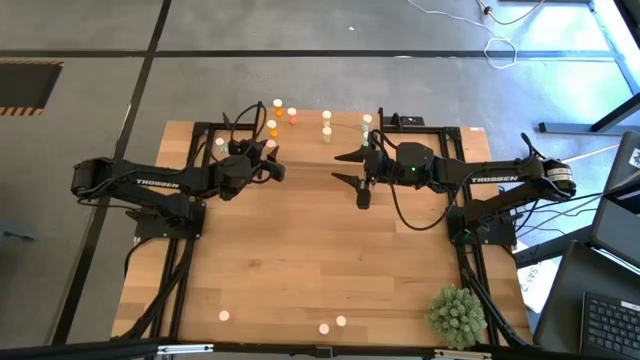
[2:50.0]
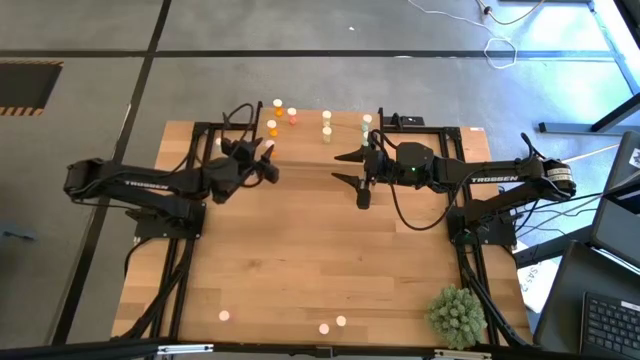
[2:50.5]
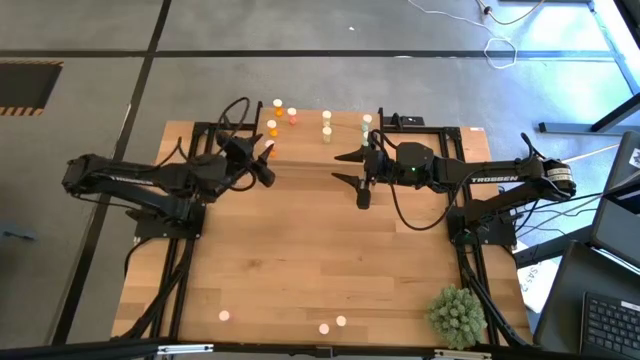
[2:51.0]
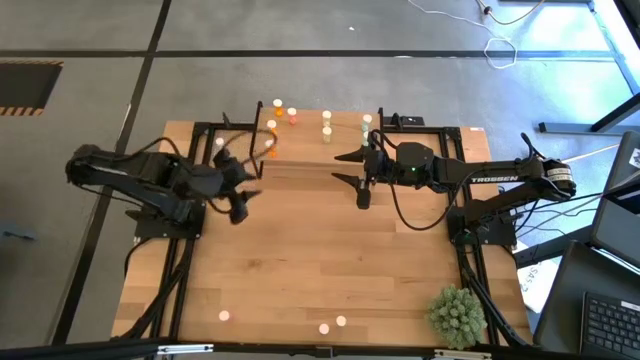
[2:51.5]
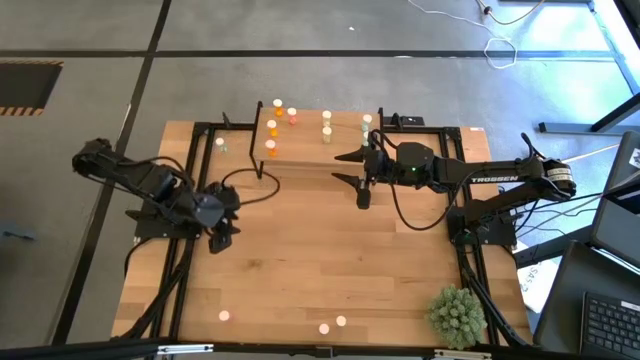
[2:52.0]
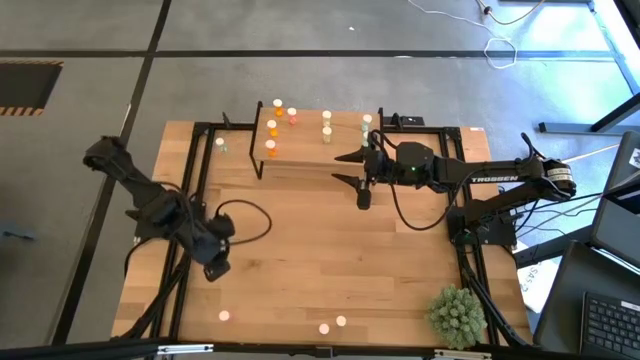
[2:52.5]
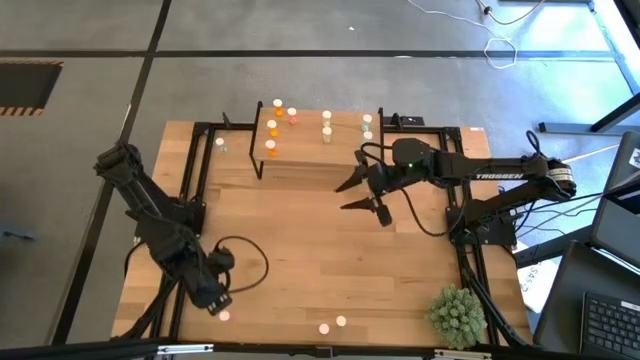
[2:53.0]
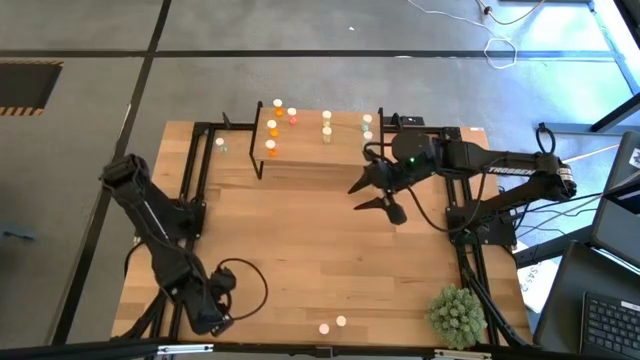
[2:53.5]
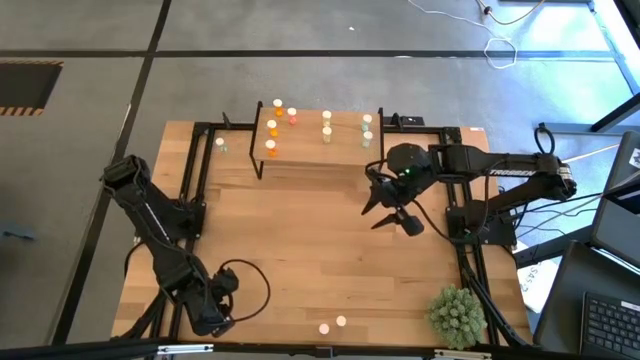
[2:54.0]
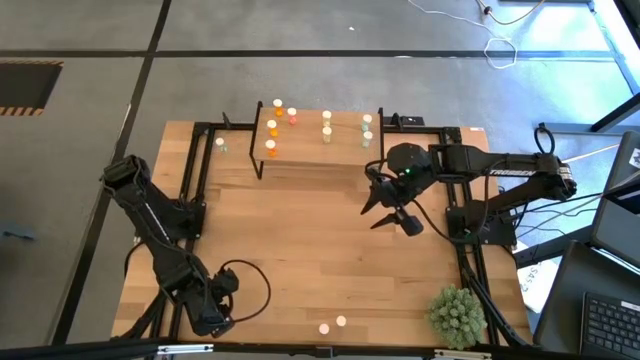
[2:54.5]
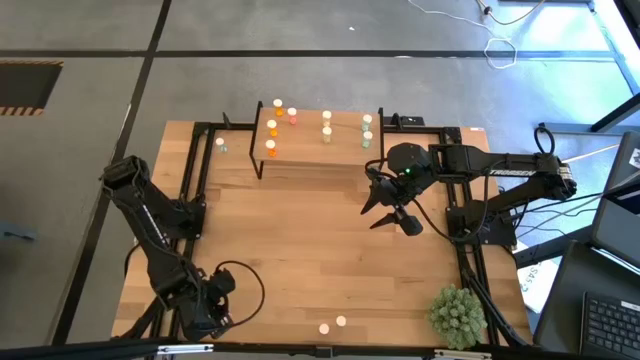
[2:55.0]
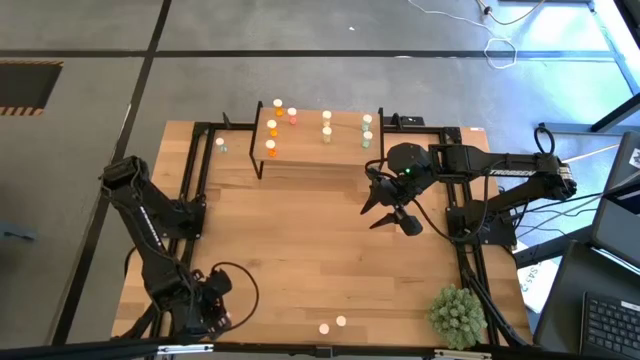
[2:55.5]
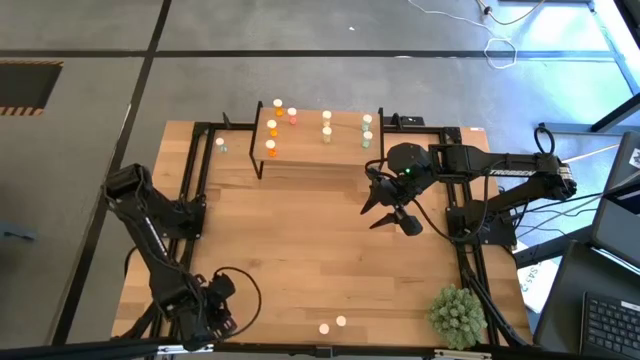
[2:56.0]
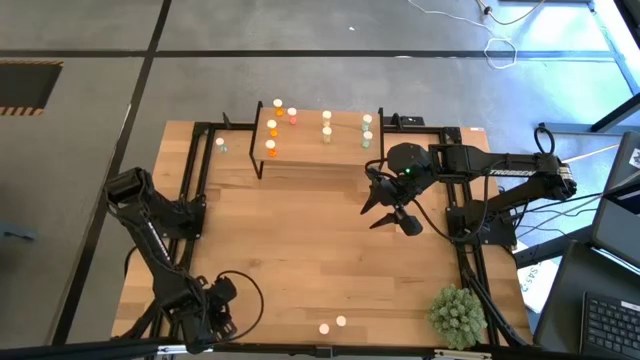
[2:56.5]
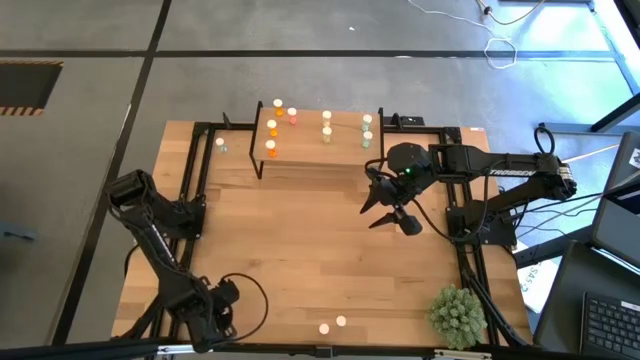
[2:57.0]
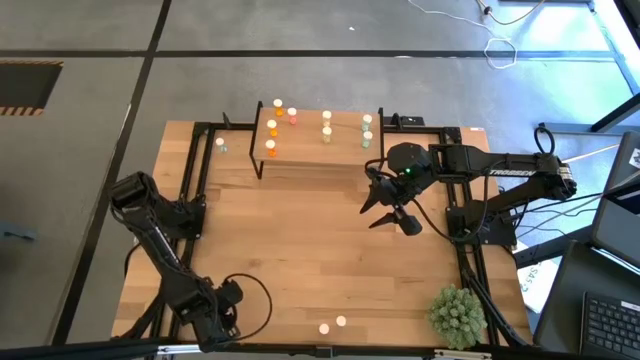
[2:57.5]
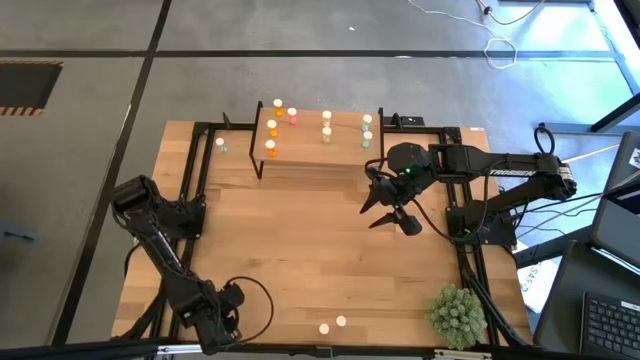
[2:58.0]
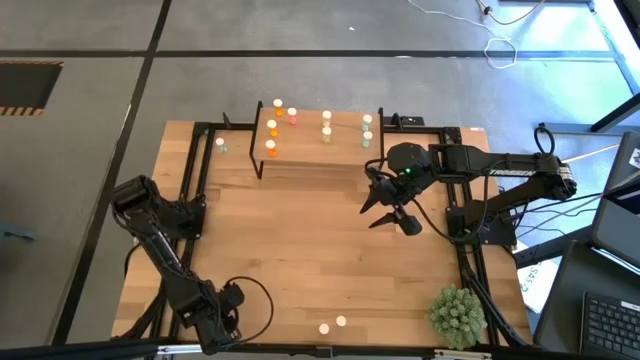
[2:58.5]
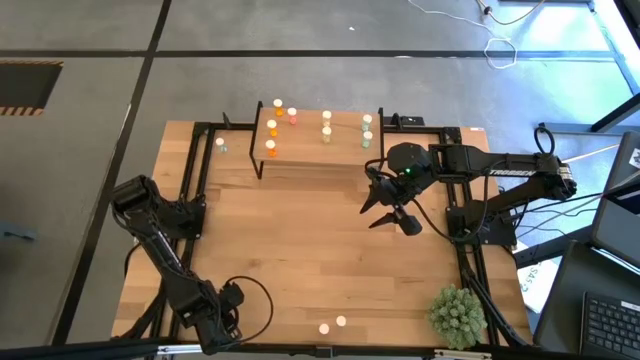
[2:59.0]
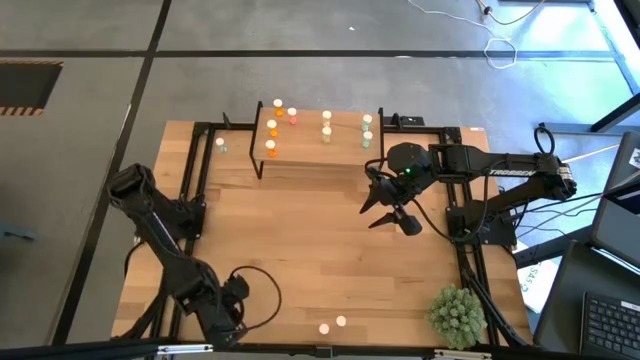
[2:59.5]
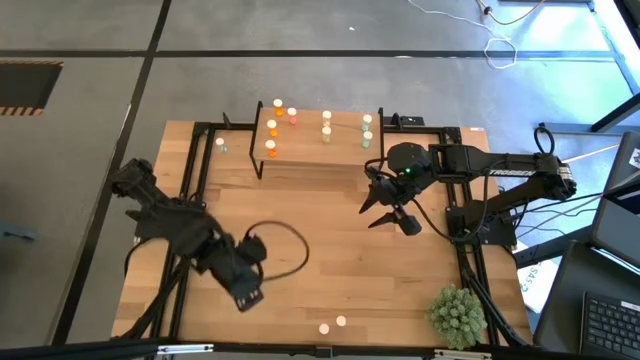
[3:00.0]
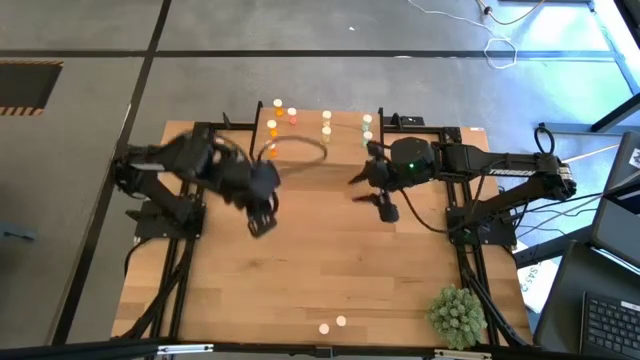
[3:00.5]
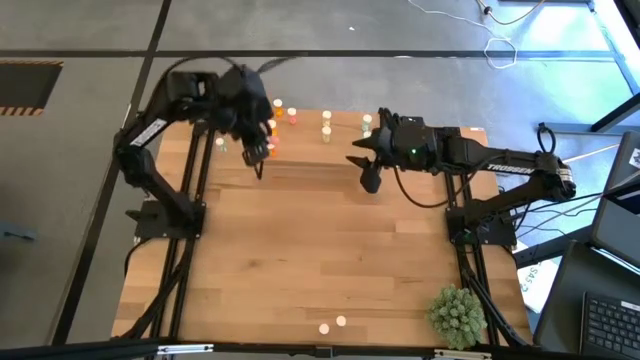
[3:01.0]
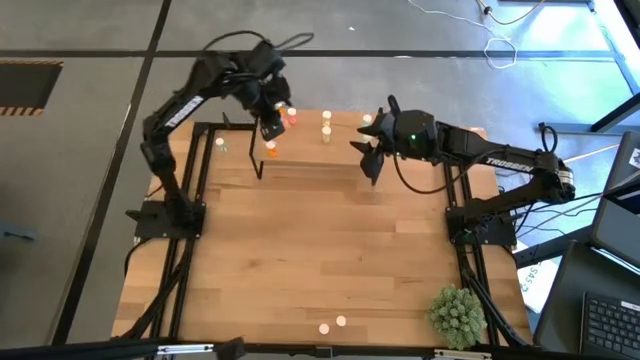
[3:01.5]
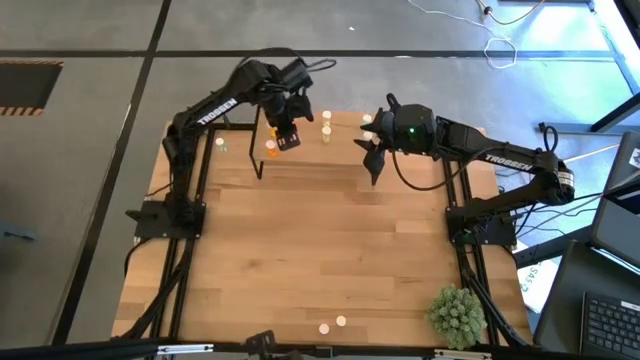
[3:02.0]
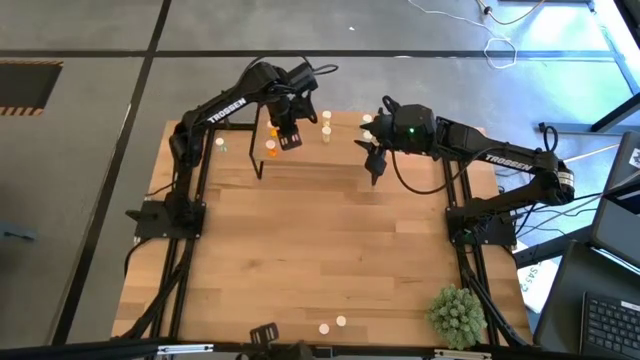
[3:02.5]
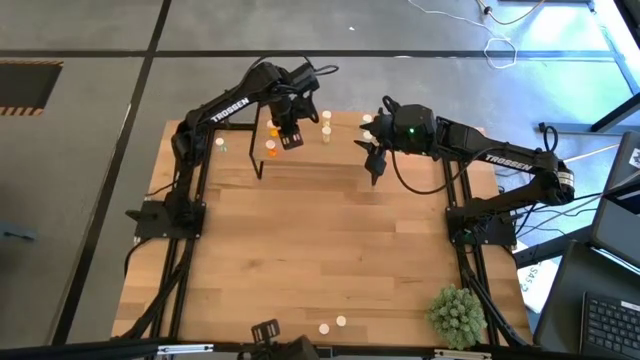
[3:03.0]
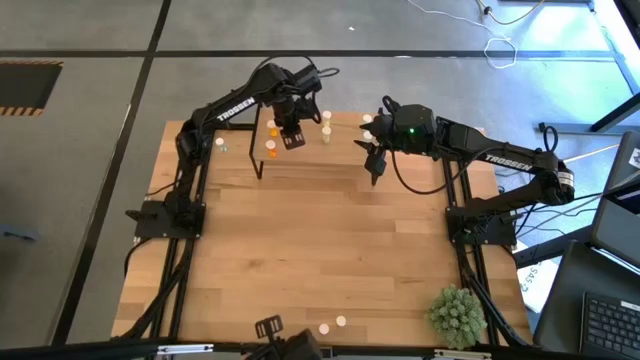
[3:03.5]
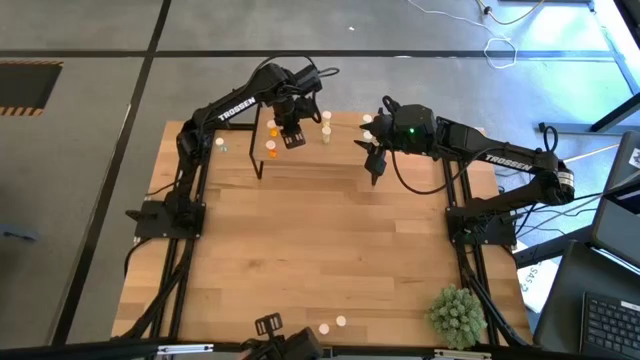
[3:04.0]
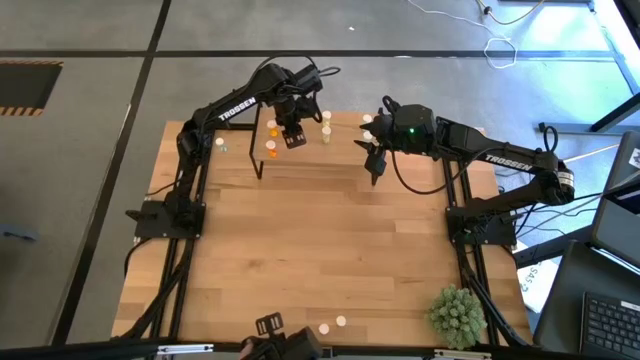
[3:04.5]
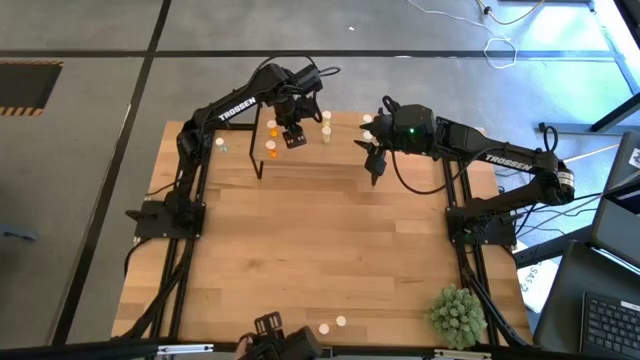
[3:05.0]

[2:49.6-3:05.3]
Task: Pick and place medicine bottles onto shelf by color
Put the left pink pill bottle on the shelf aligned with the other orange pill bottle

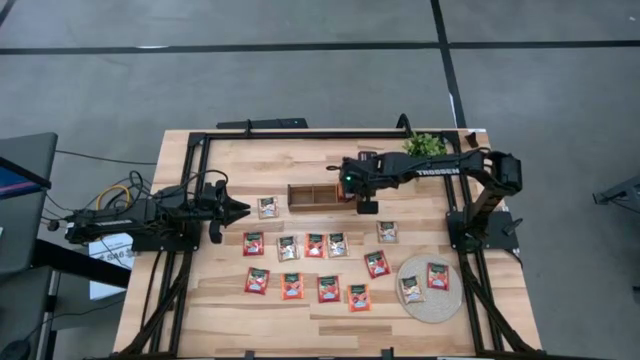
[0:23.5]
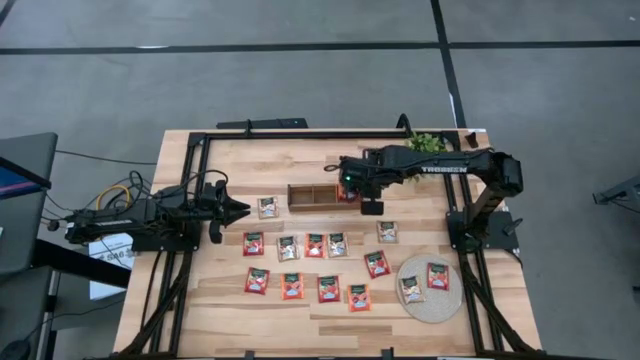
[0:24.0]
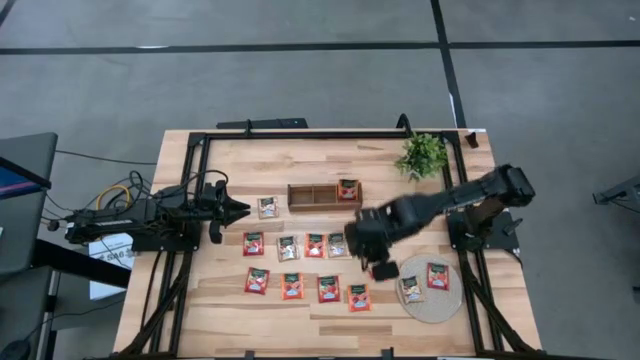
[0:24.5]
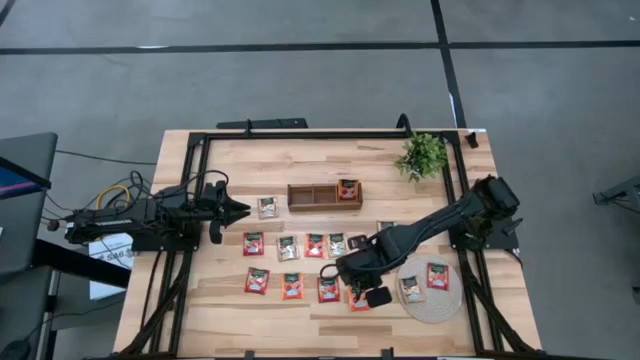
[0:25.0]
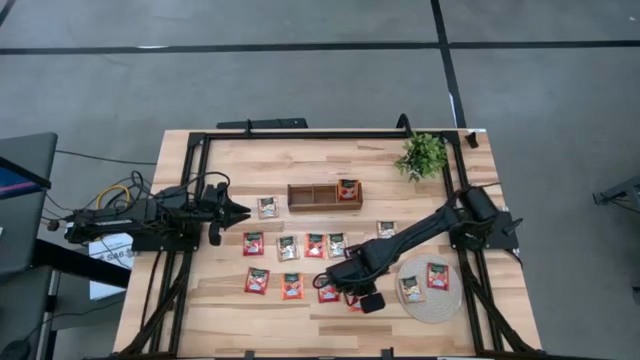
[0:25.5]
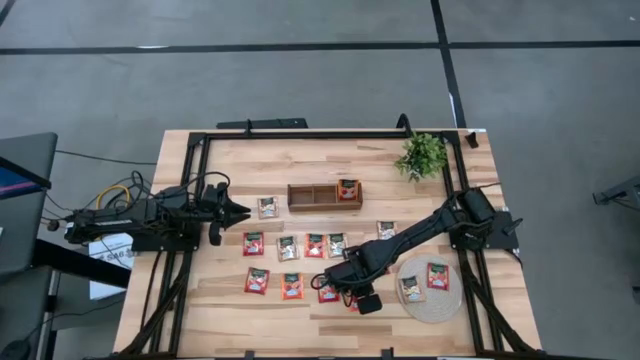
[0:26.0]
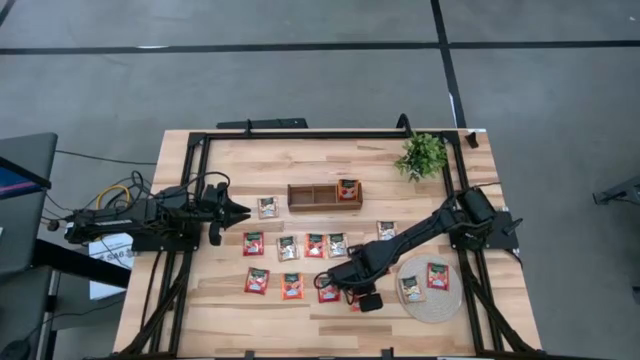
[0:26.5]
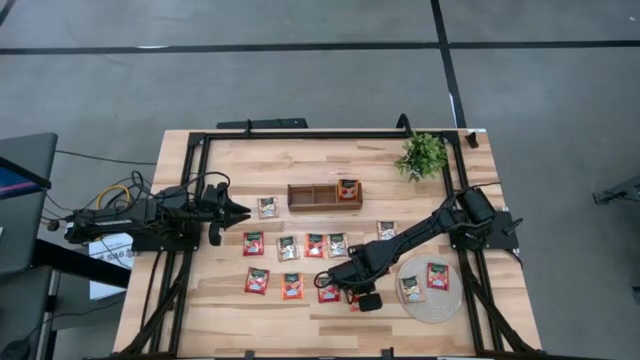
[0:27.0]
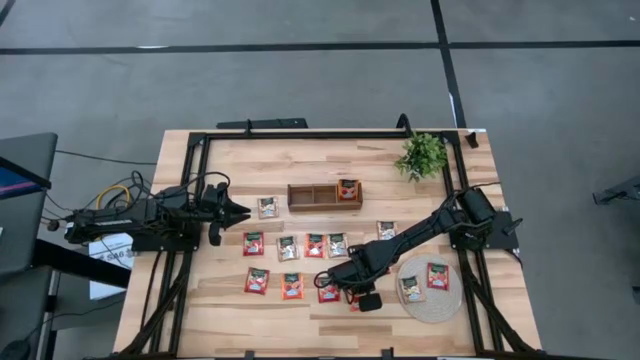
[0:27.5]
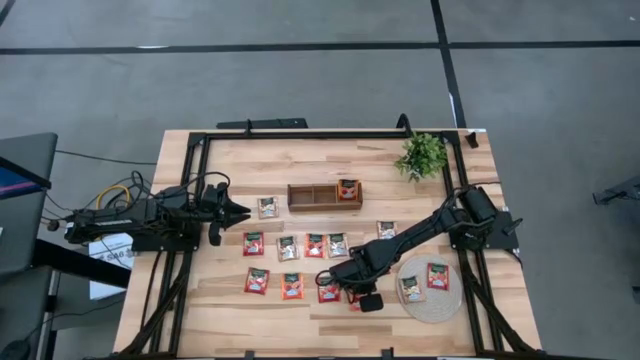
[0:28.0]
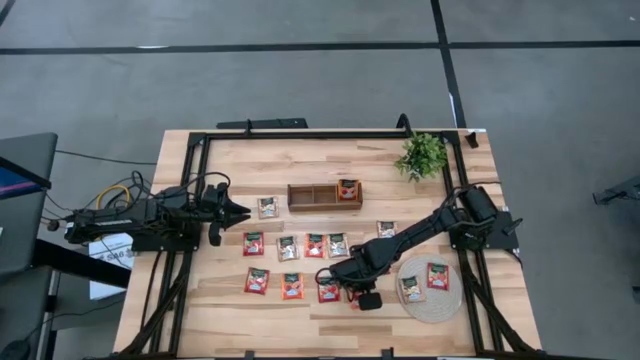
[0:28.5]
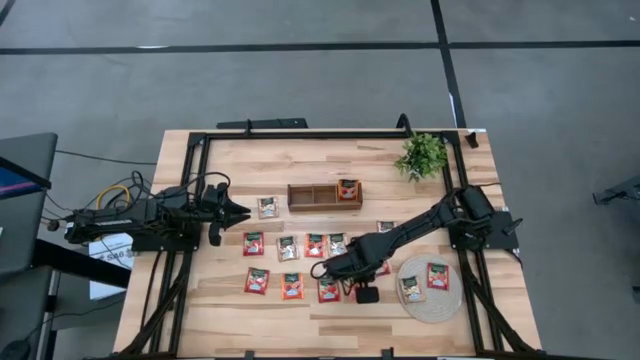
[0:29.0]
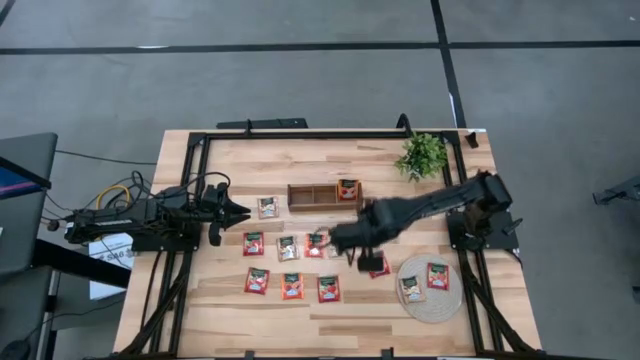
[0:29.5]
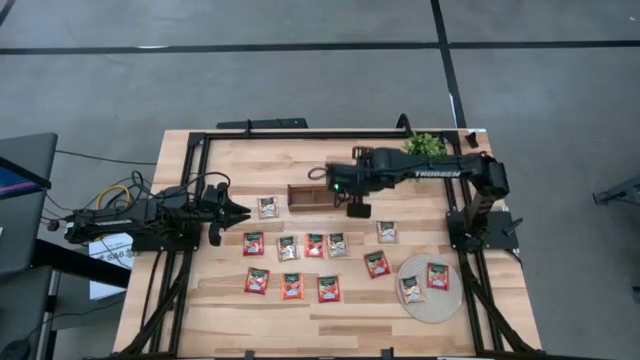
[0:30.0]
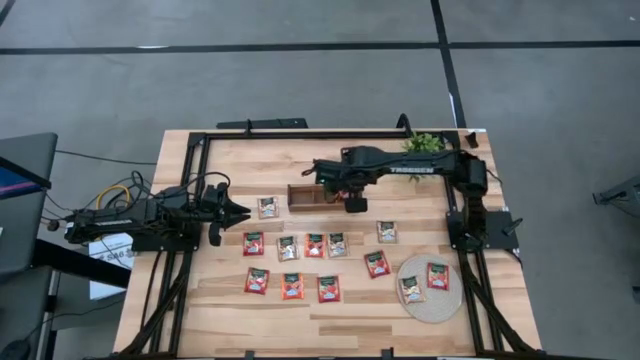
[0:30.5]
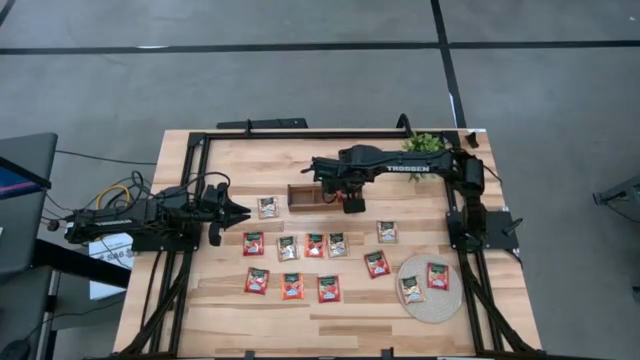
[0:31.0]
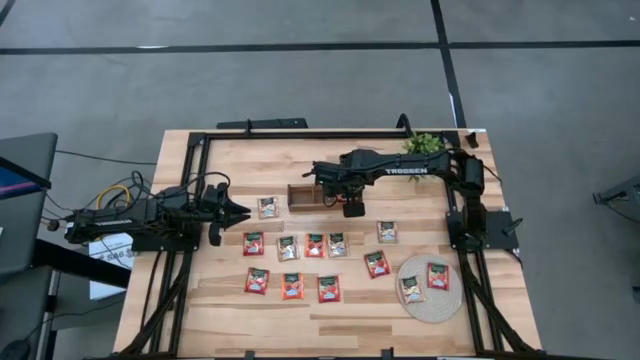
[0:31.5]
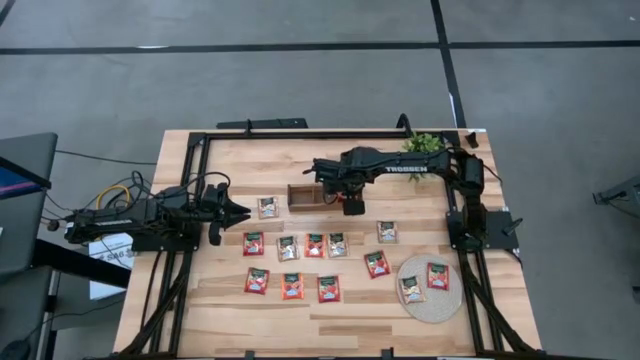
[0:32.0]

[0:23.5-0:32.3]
Task: Pick & Place Tea
Put the orange tea bag into the right section of the wooden organizer
